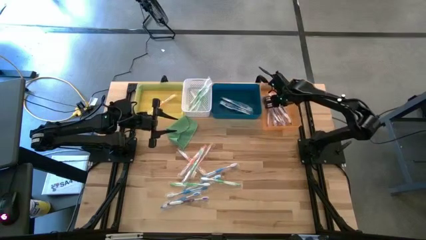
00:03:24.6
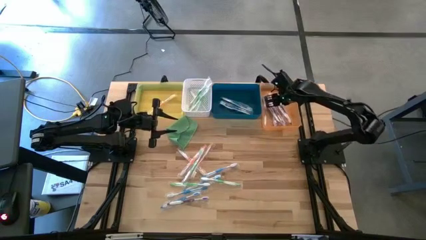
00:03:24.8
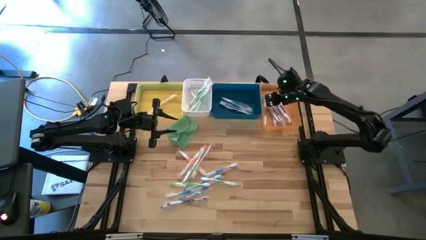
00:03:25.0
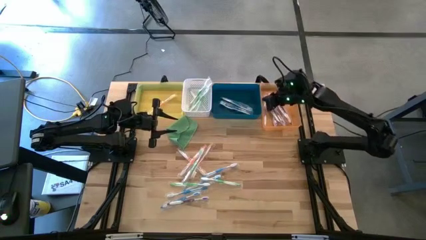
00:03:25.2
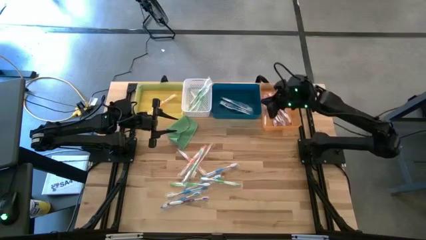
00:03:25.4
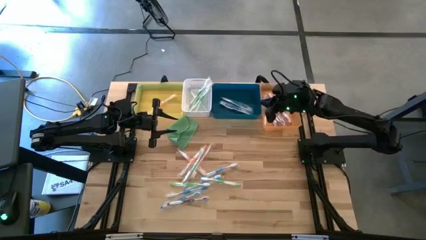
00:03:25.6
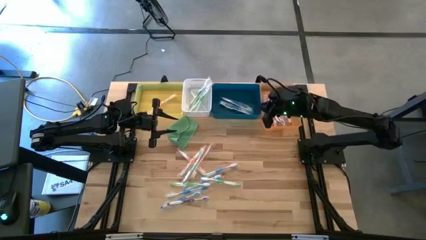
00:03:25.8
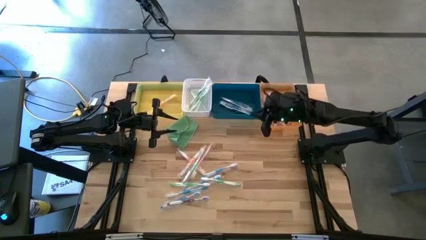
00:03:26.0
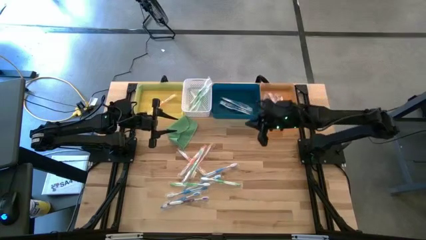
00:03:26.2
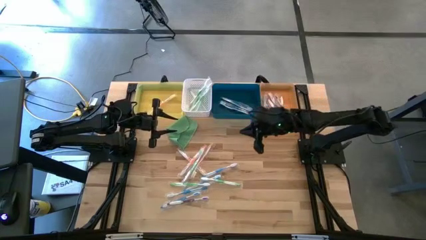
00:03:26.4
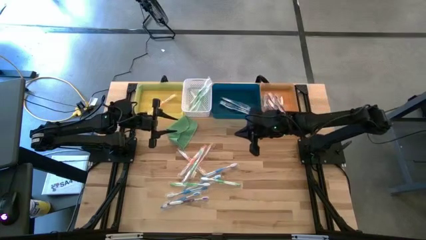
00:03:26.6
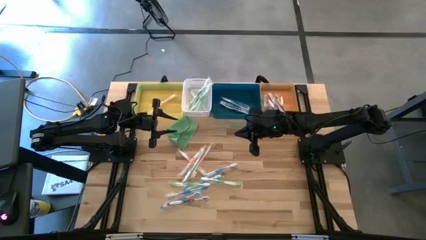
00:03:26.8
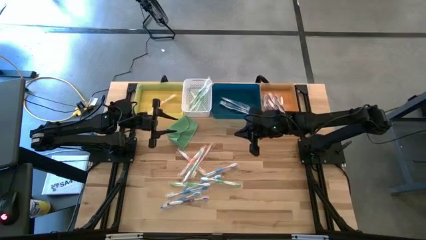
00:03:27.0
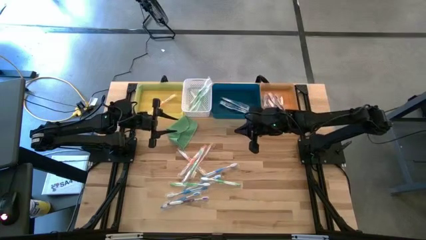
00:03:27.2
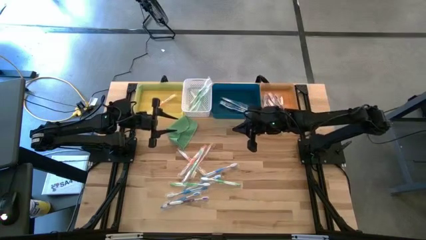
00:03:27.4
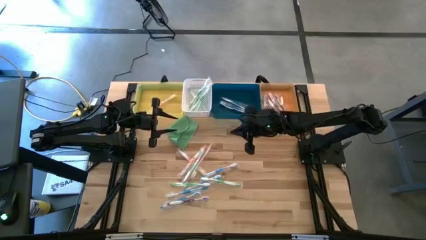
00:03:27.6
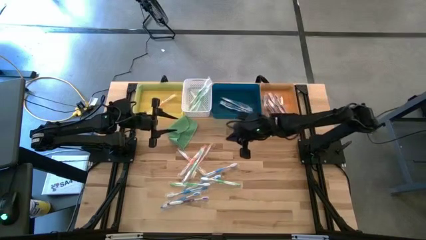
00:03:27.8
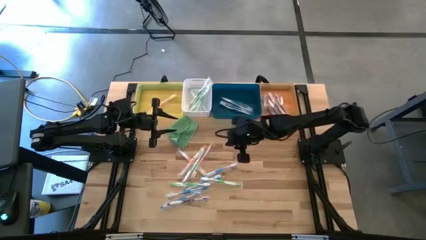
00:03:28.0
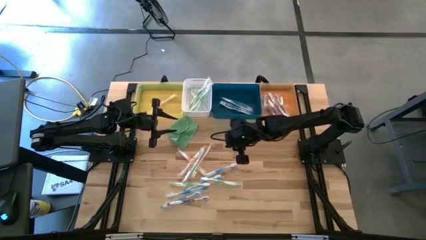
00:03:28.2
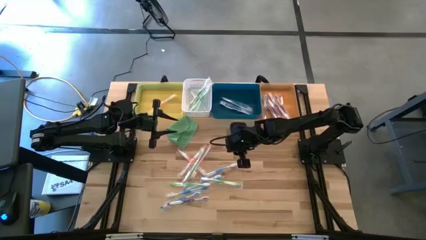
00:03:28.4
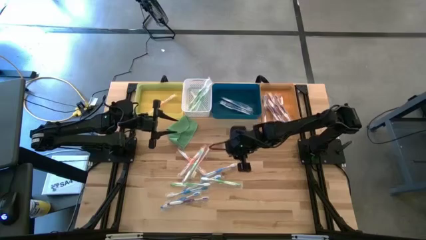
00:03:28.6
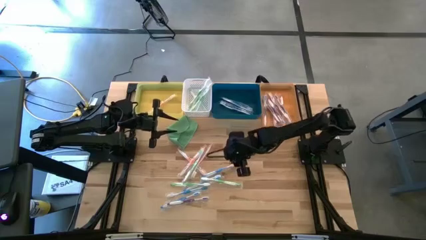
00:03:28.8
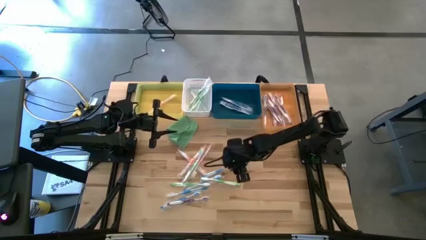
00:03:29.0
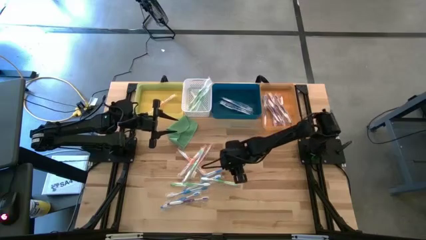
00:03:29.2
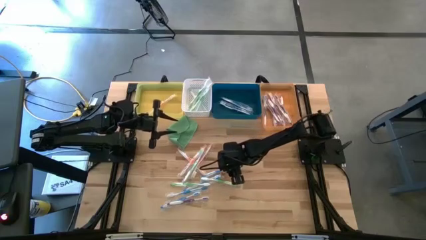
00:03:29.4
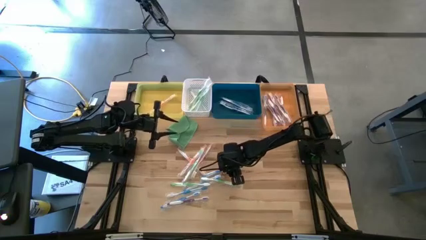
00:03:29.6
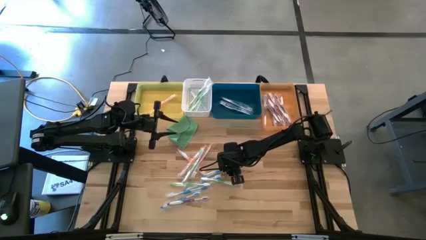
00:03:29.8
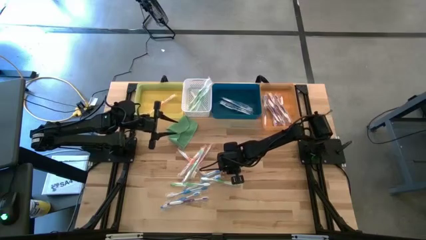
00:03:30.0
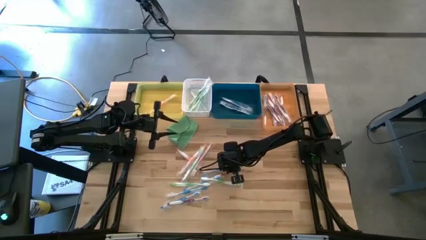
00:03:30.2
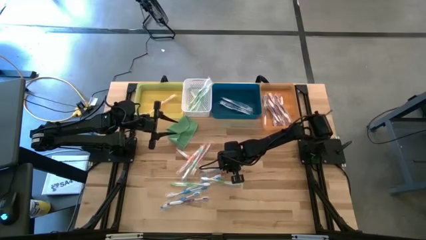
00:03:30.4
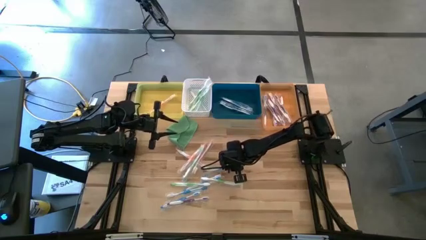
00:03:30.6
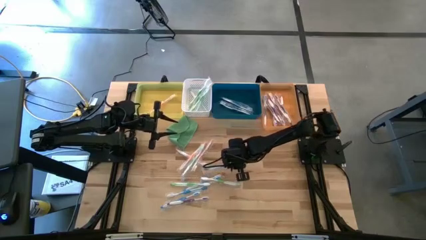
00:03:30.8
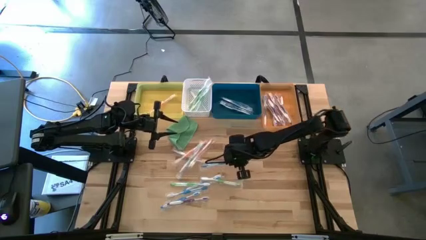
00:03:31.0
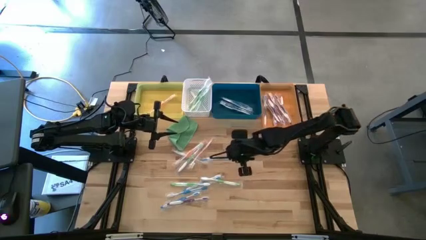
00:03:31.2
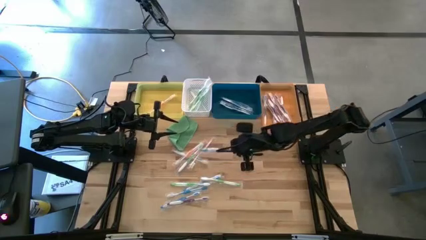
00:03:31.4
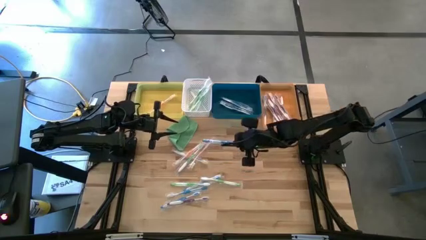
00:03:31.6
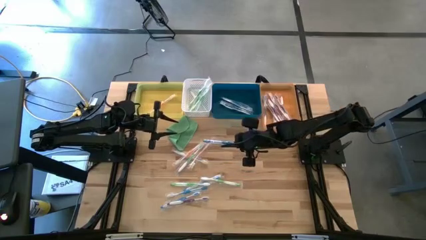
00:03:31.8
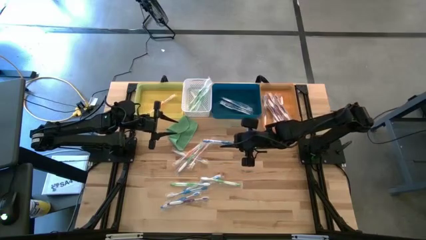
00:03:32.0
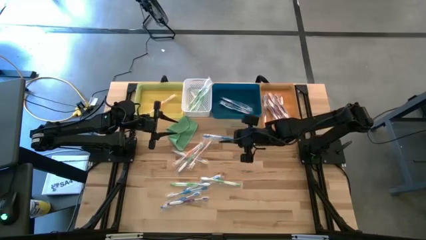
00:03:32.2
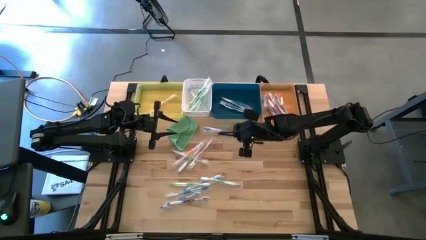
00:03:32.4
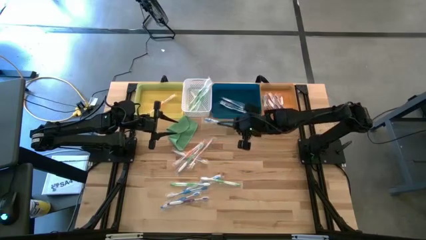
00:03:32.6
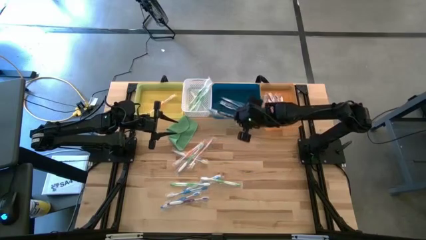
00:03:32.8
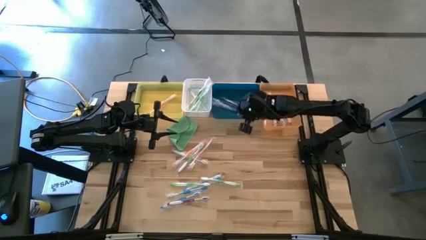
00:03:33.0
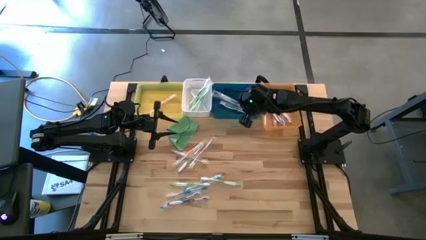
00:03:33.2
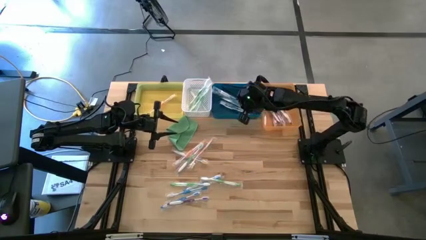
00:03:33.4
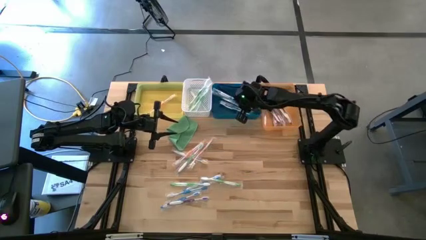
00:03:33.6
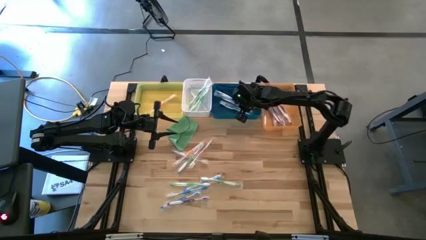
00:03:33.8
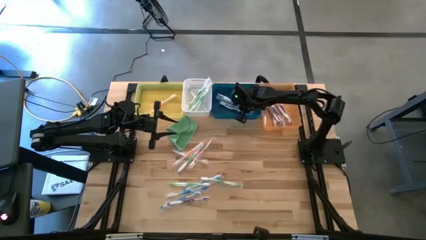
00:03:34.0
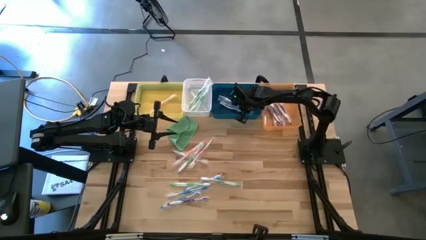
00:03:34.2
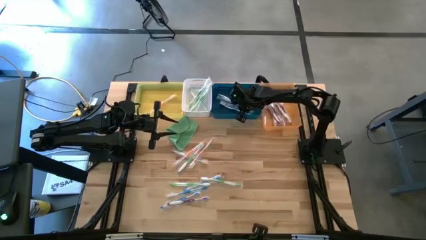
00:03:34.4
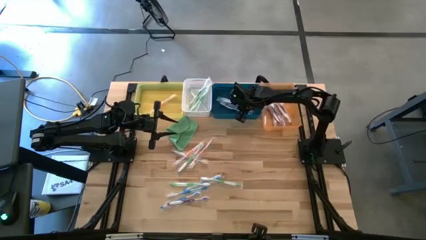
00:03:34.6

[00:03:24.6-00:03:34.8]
Task: Pick & Place Toothbrushes
Put the blue toothbrush into the blue bin

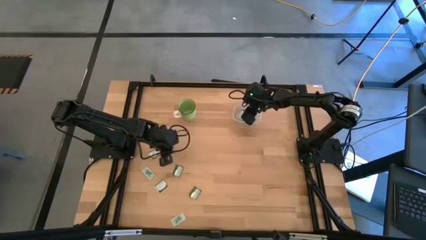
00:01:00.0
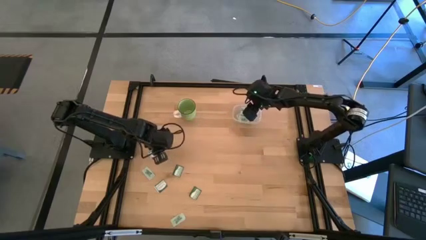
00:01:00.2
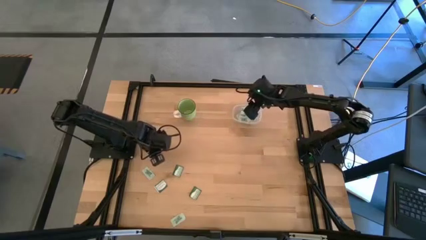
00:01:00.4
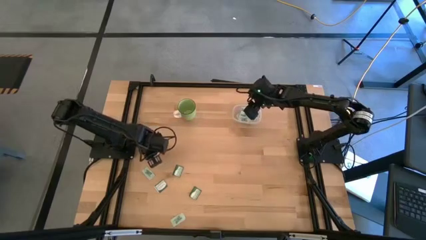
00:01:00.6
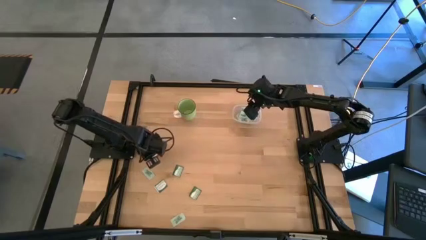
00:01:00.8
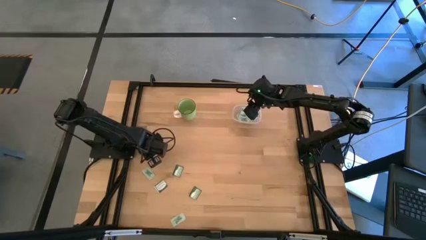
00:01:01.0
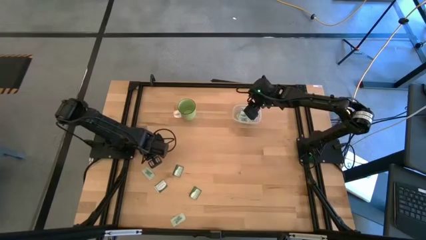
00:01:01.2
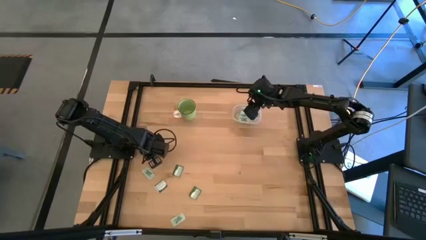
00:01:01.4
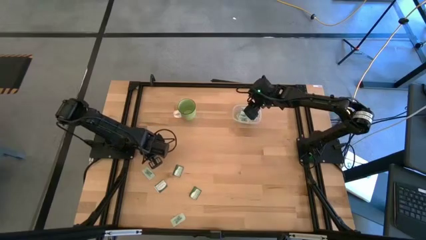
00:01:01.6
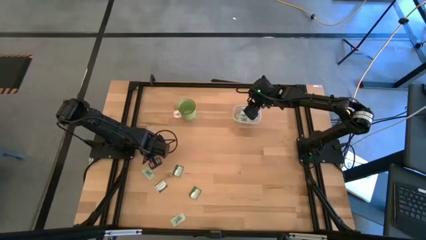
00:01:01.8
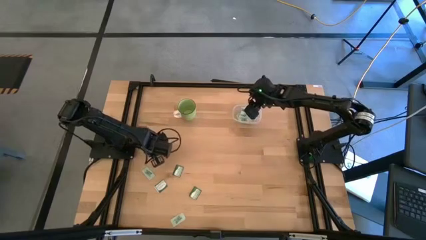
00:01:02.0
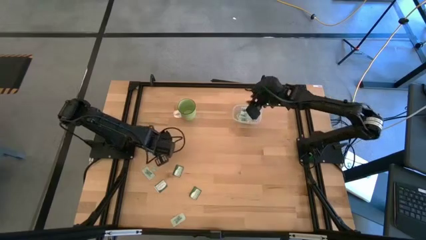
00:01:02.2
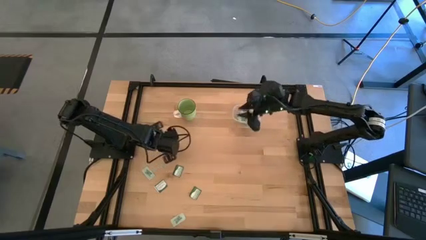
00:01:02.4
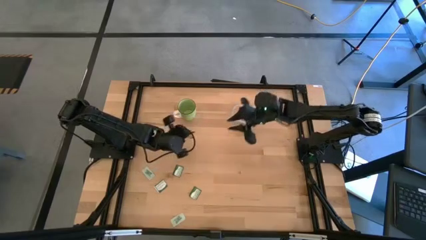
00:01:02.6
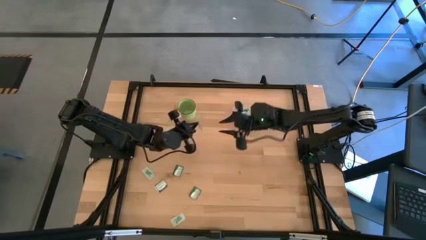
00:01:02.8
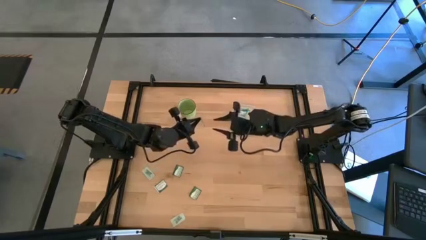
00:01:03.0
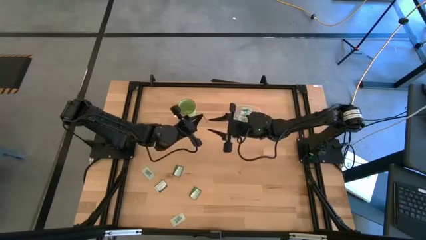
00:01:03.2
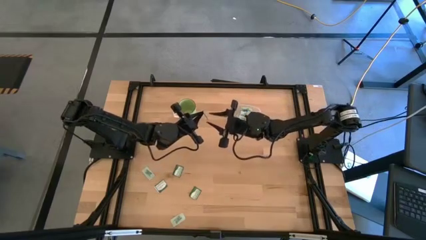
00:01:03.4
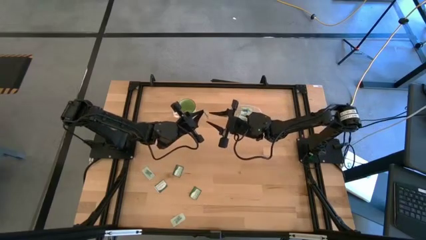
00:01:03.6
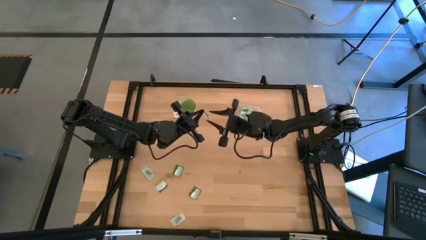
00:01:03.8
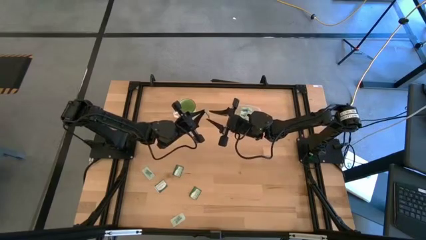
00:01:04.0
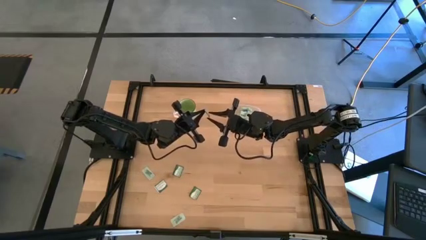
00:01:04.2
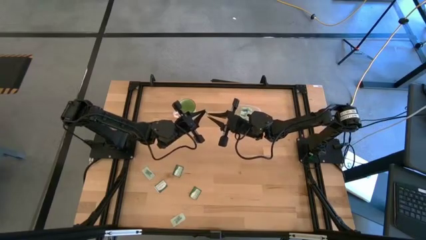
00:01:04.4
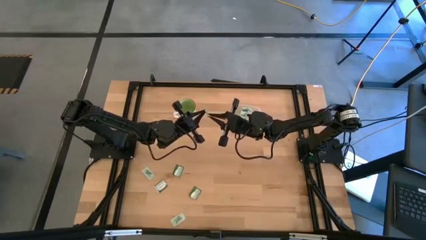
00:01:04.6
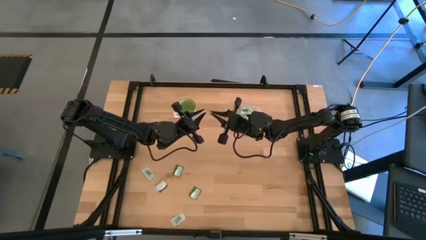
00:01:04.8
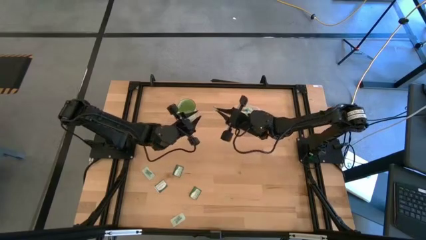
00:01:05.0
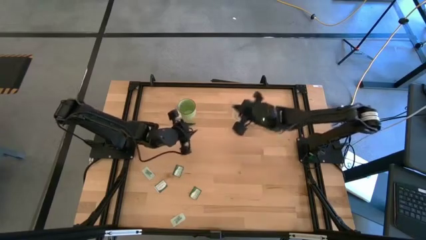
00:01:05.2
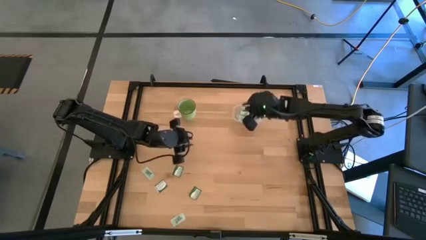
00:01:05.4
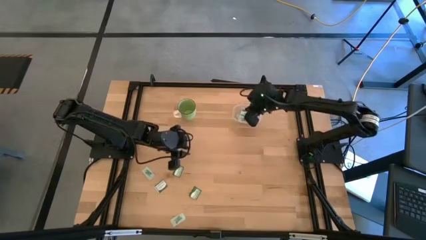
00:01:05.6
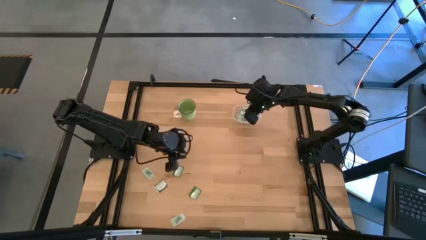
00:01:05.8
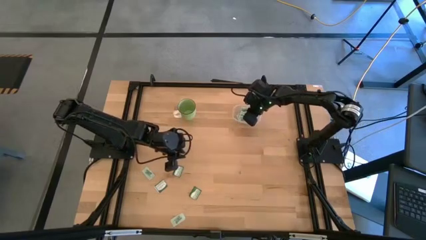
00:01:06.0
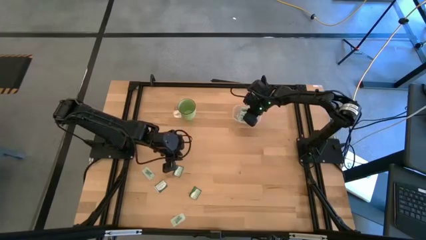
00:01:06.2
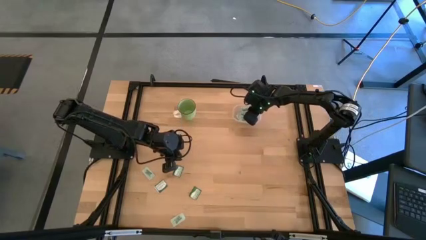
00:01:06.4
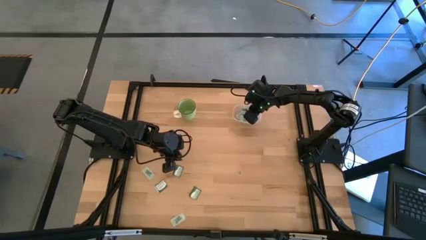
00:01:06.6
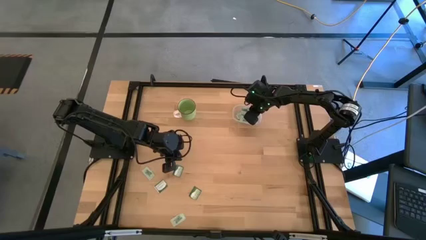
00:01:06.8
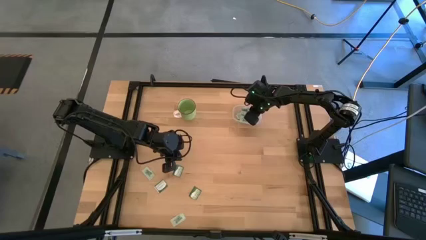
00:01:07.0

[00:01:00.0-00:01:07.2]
Task: Pick and place items into bin
Put the green truvia packet into the transparent bin
